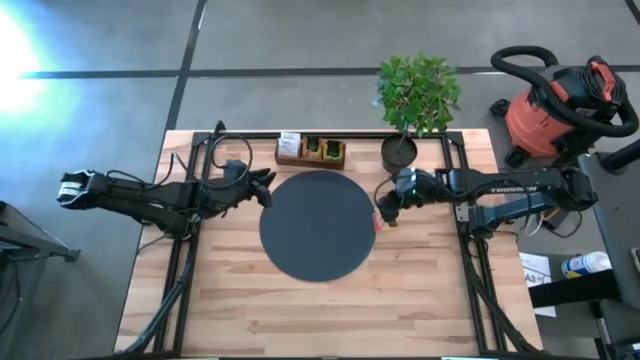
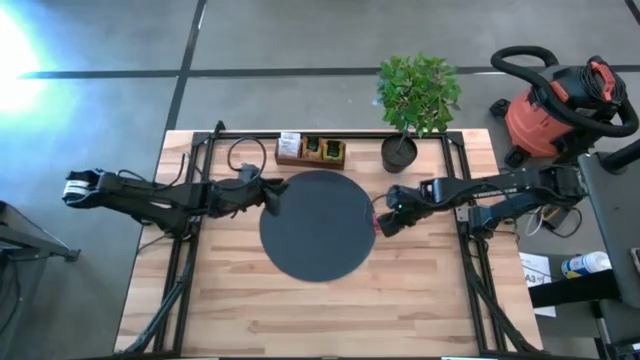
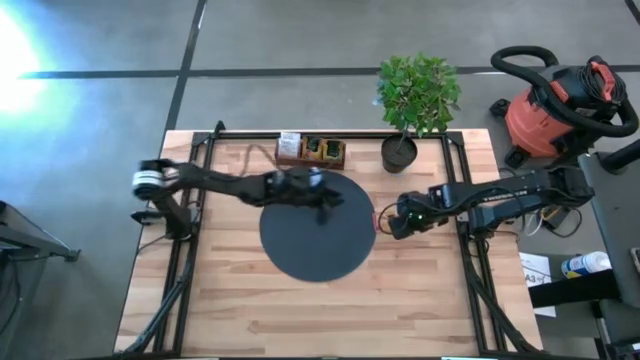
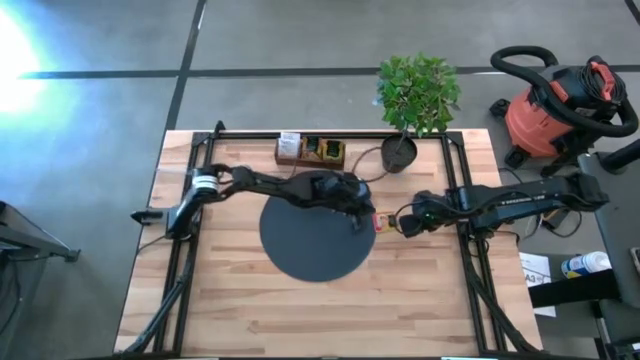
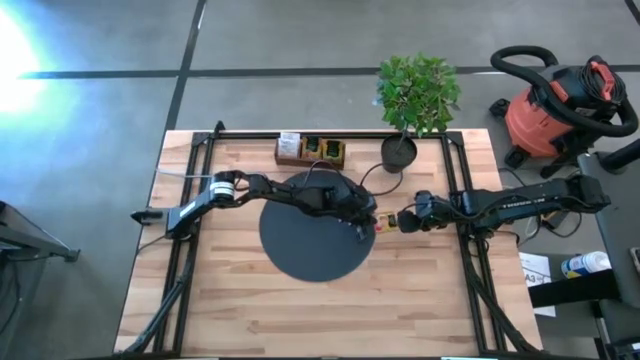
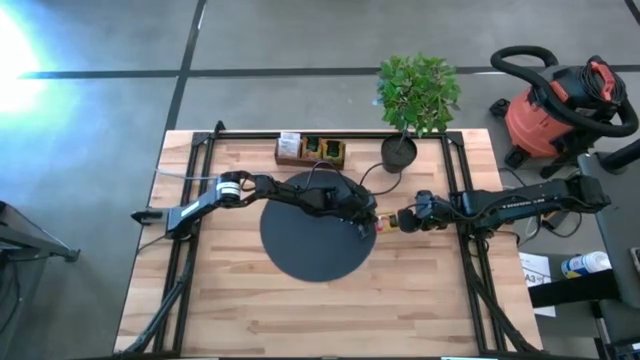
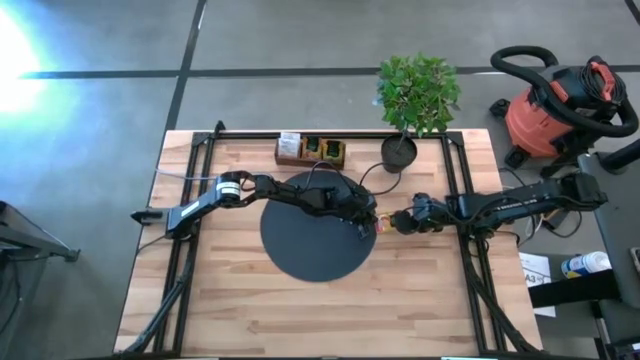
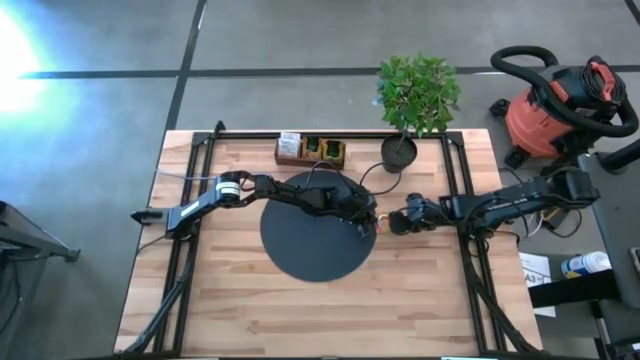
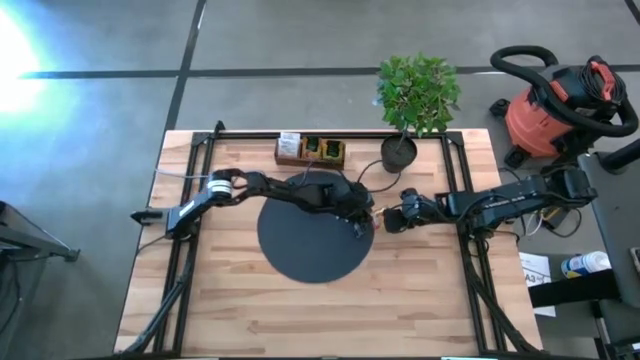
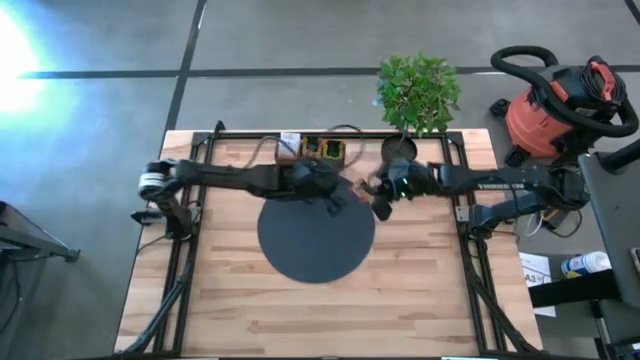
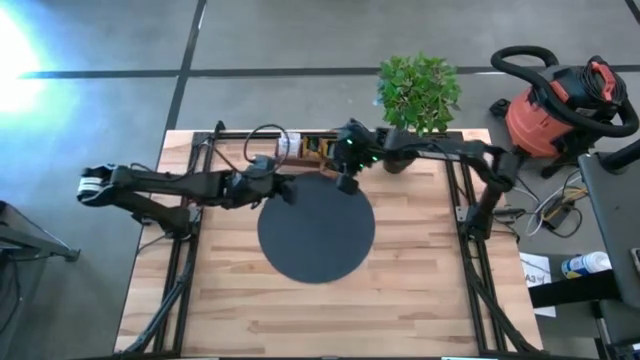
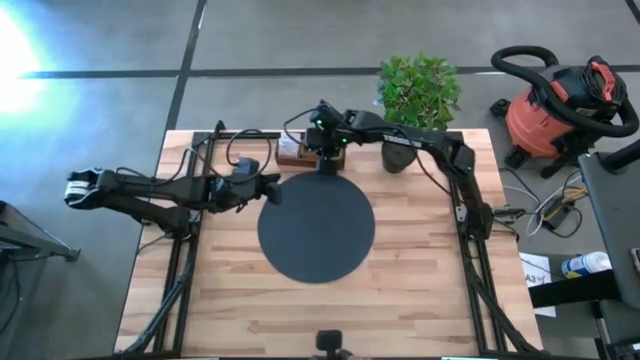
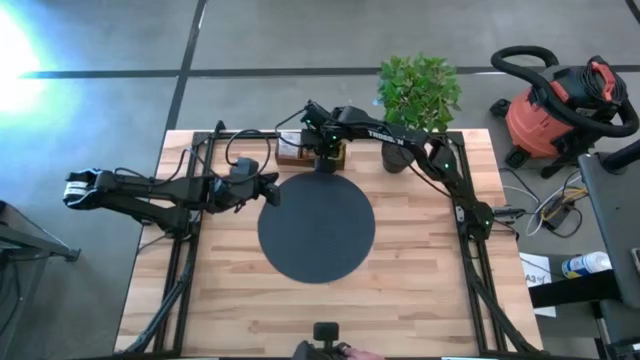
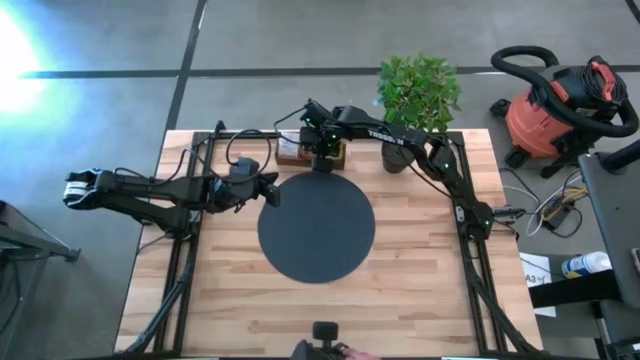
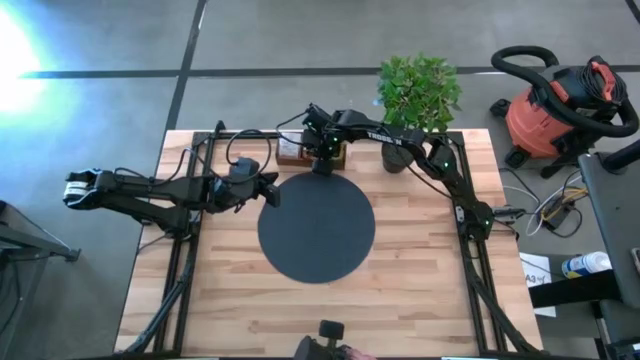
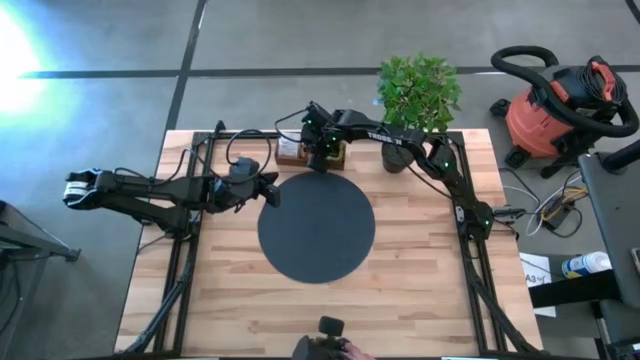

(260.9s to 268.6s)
Task: Pick & Place Tea
Put the orange tea bag into the middle section of the brown wooden organizer

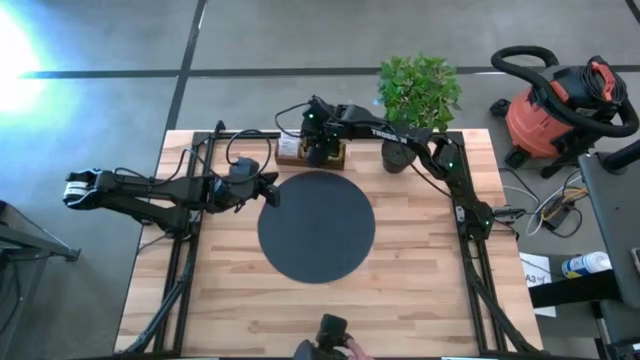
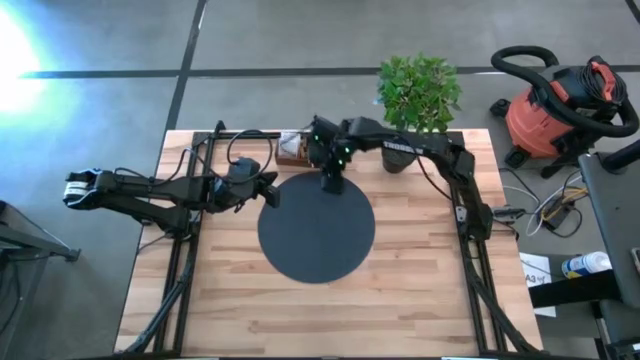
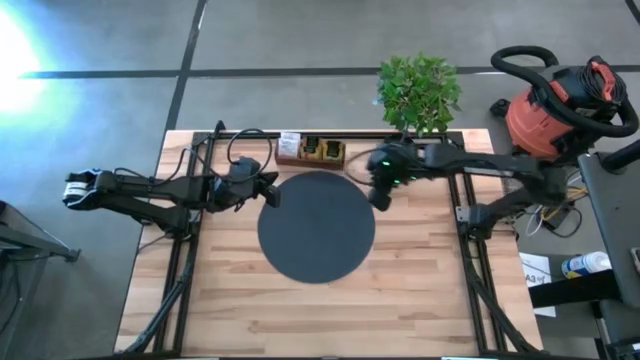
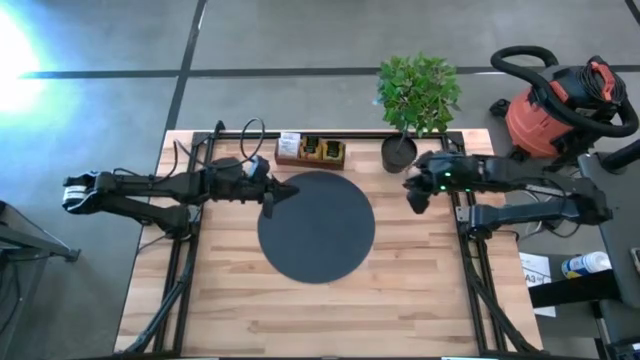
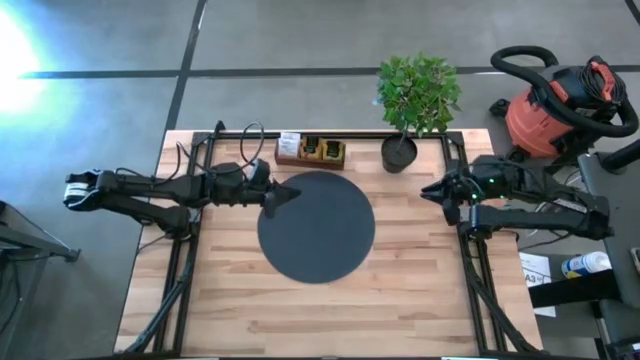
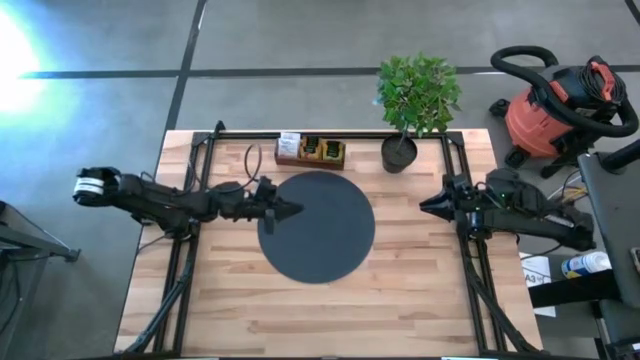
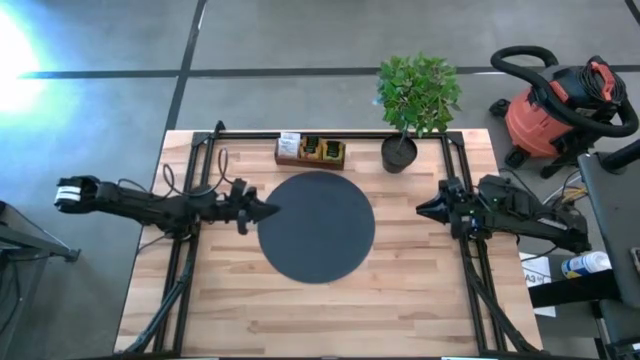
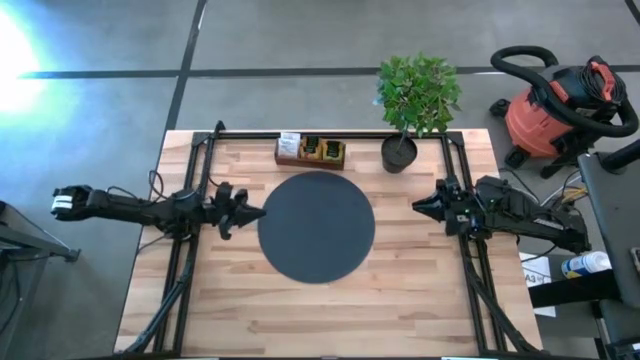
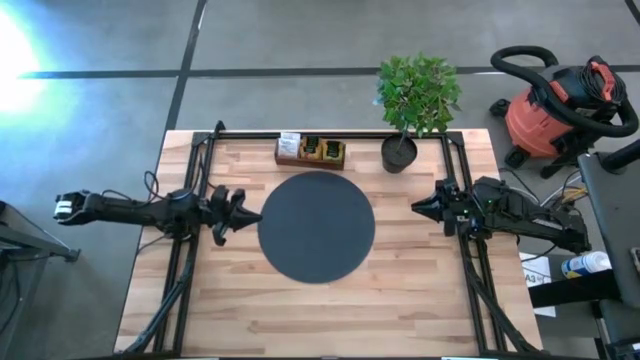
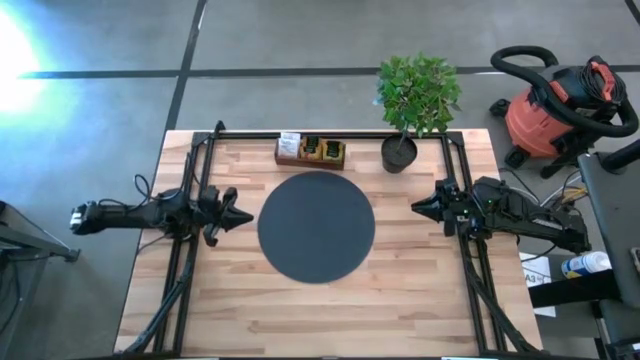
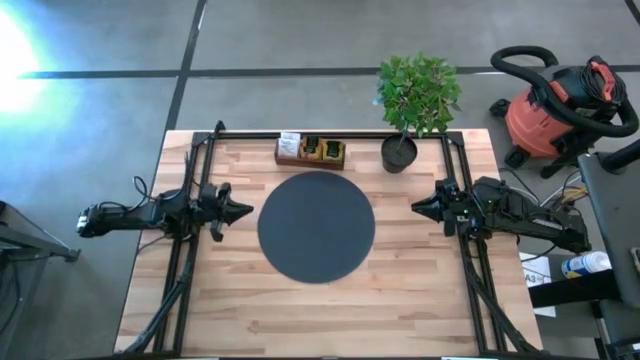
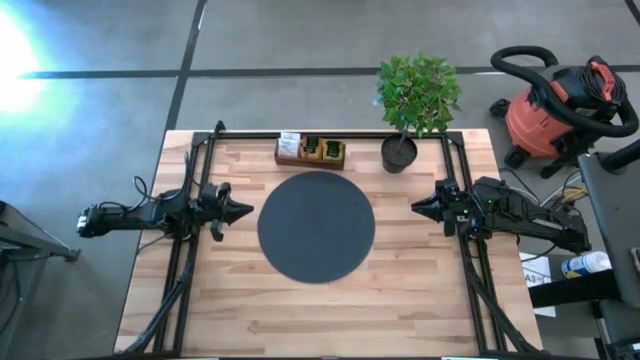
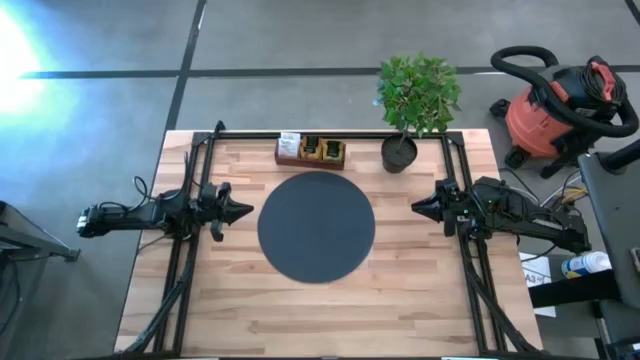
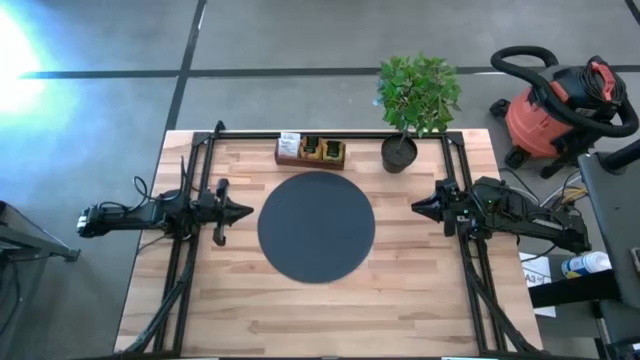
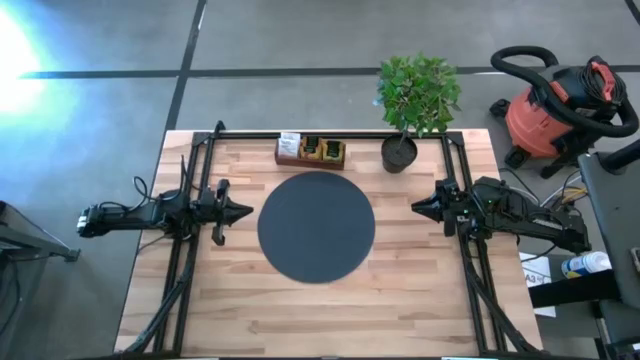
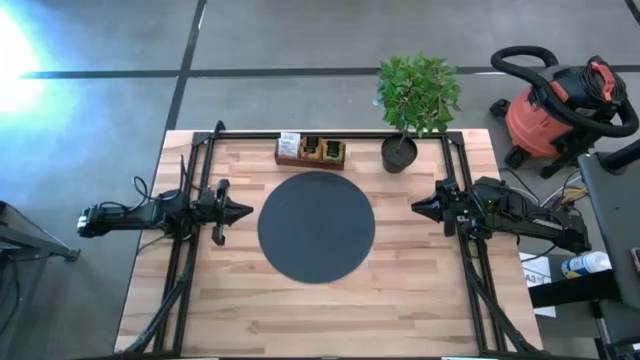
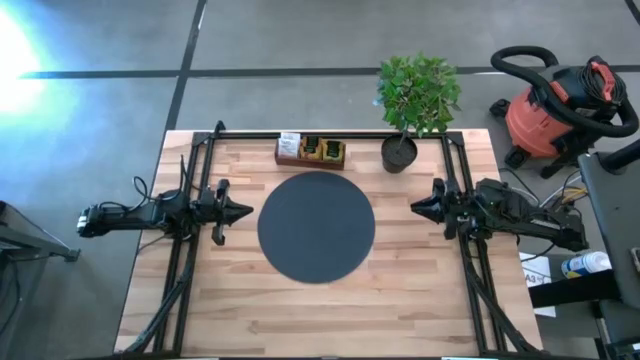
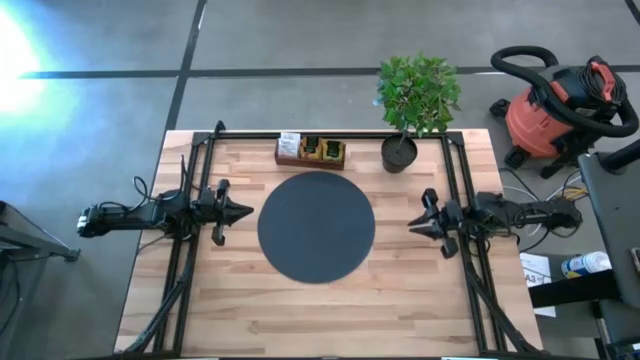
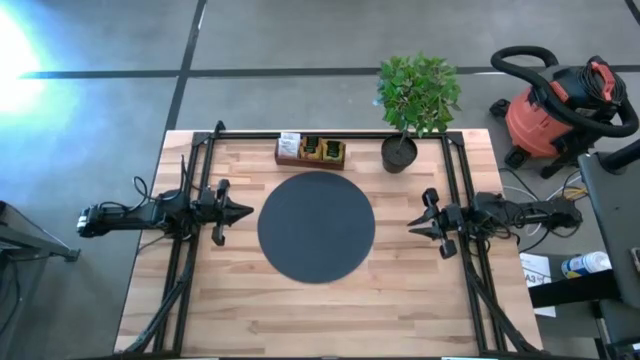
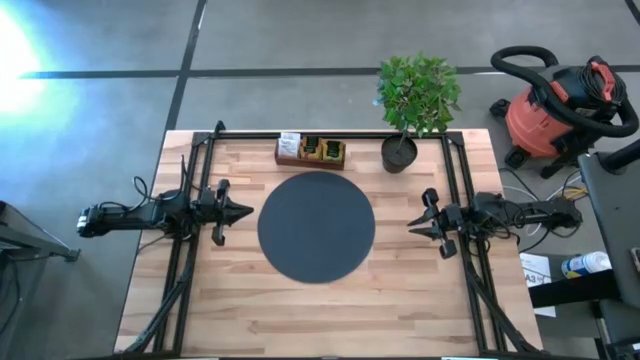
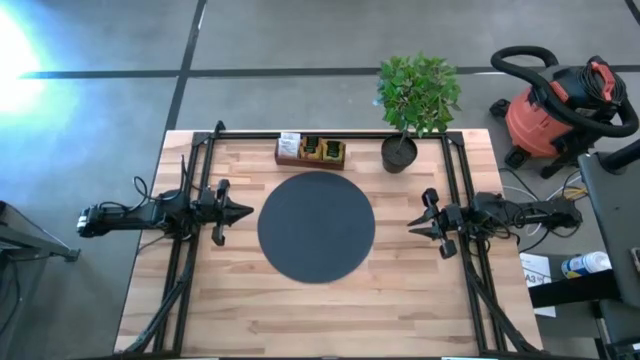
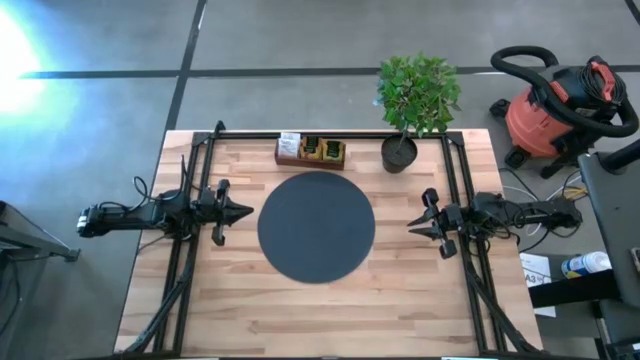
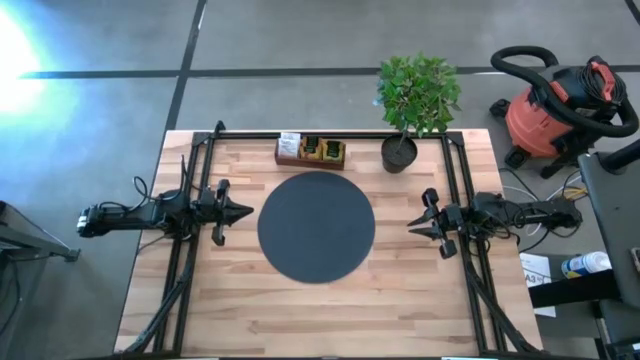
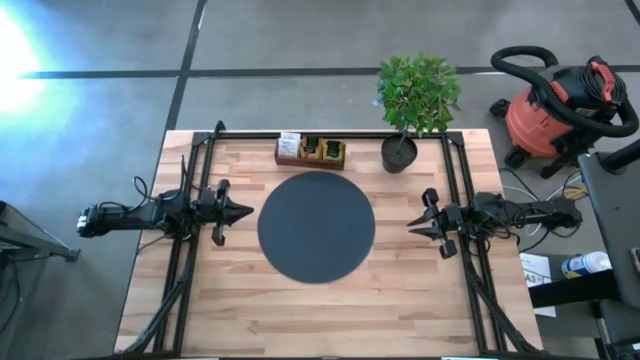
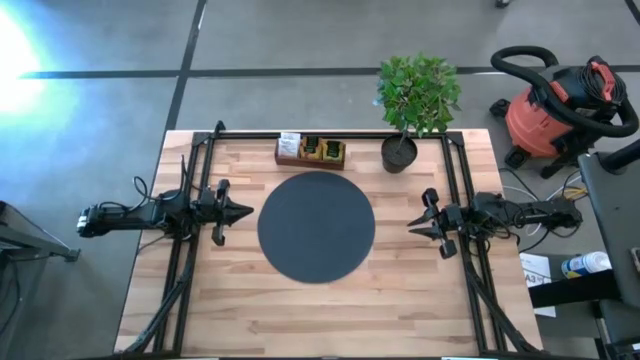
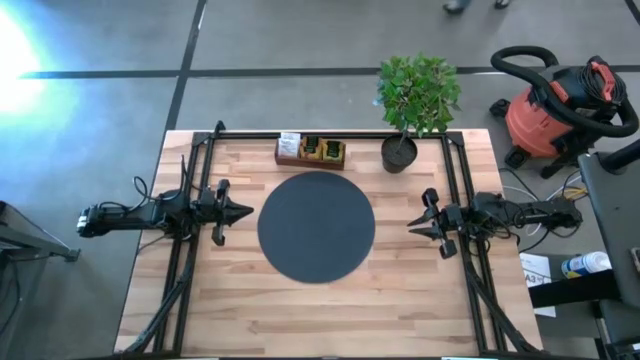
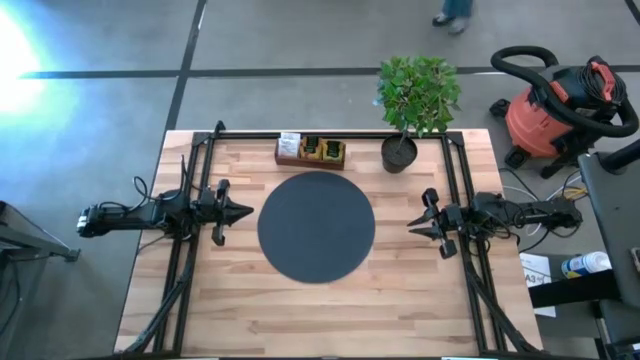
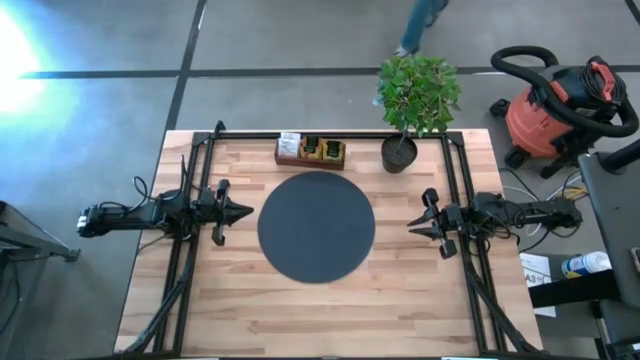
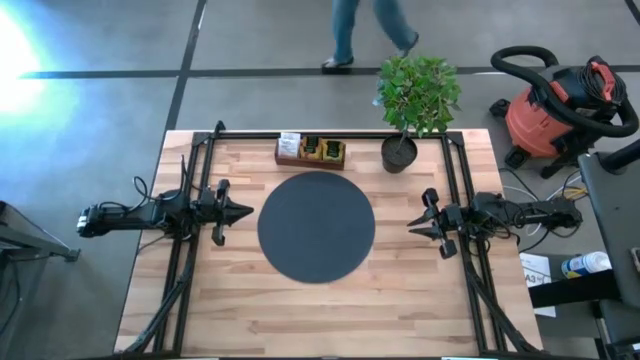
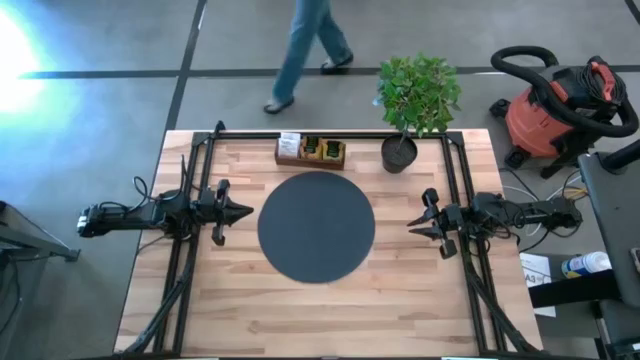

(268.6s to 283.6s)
Return to Home Position
